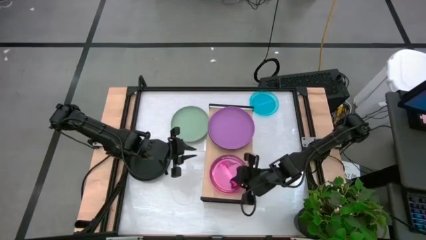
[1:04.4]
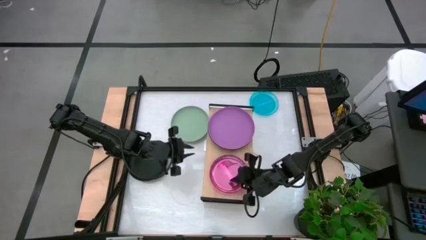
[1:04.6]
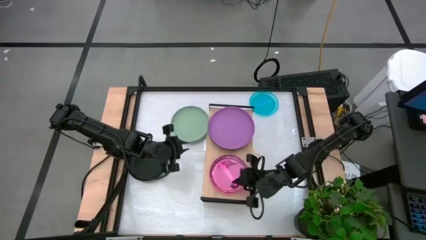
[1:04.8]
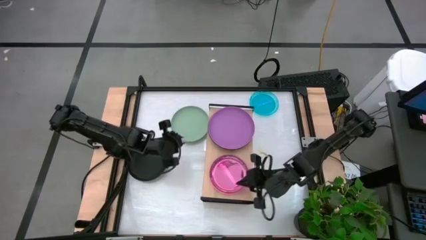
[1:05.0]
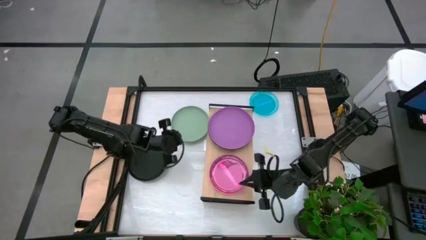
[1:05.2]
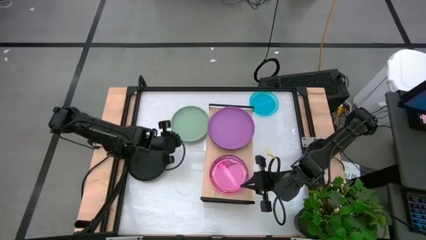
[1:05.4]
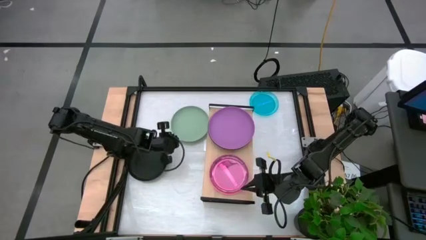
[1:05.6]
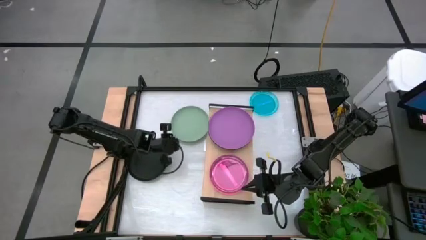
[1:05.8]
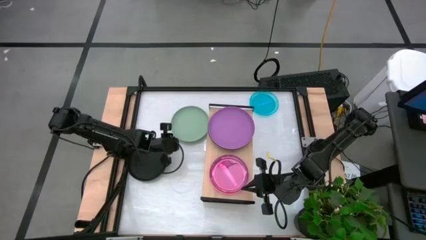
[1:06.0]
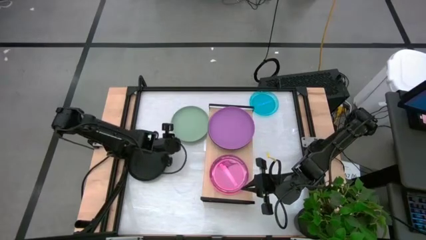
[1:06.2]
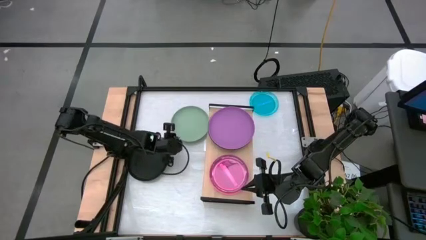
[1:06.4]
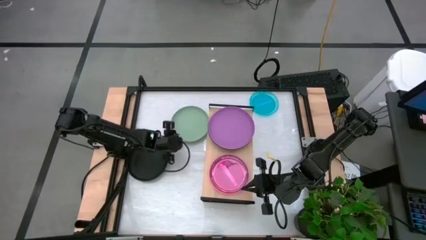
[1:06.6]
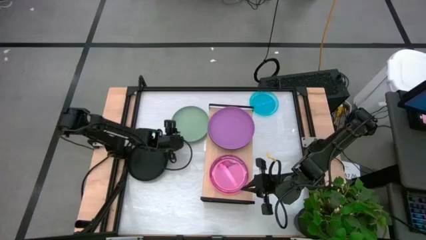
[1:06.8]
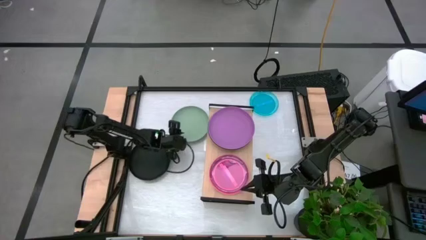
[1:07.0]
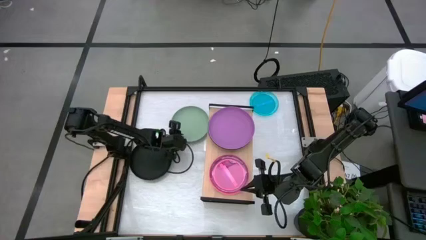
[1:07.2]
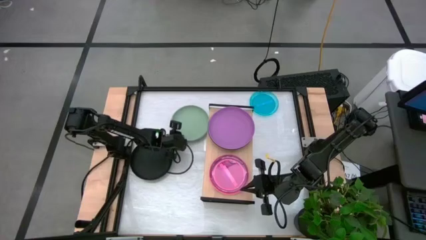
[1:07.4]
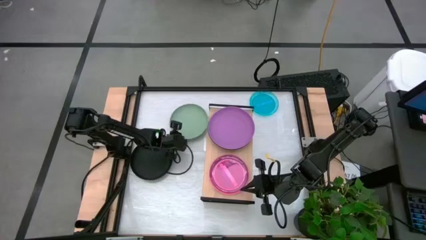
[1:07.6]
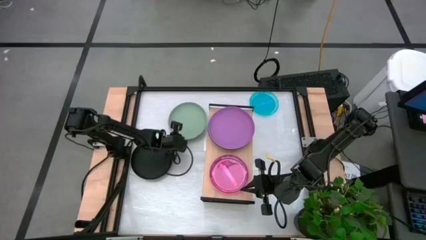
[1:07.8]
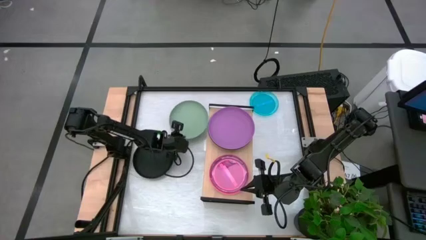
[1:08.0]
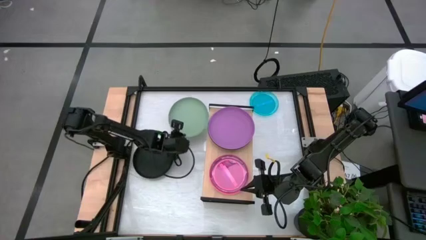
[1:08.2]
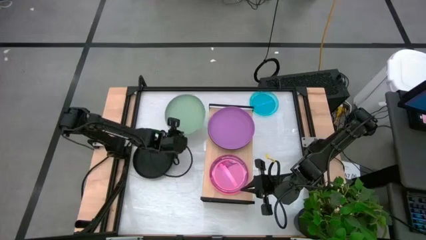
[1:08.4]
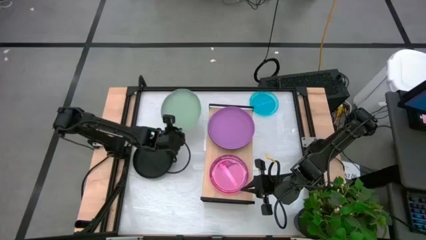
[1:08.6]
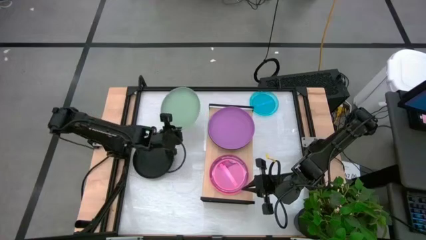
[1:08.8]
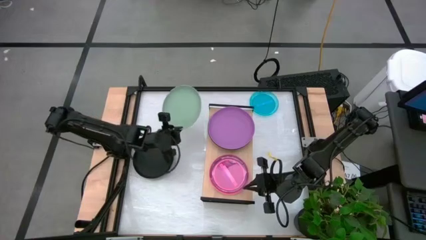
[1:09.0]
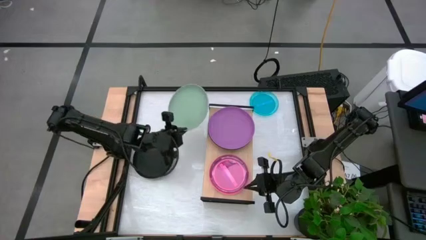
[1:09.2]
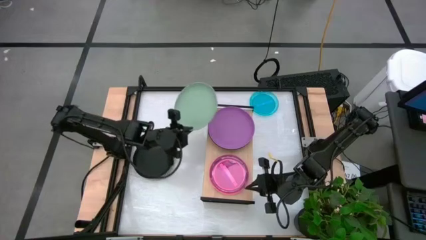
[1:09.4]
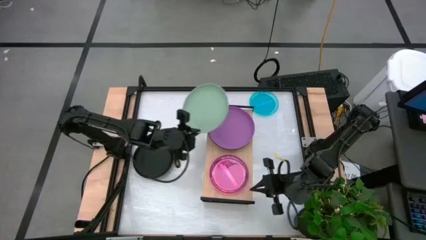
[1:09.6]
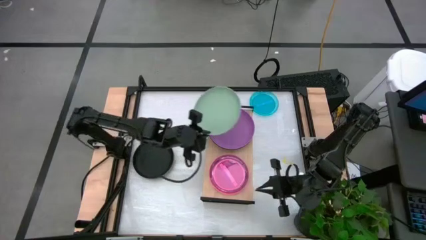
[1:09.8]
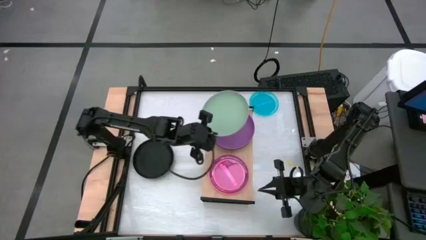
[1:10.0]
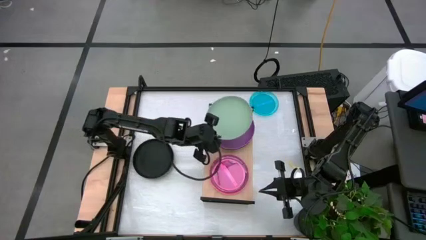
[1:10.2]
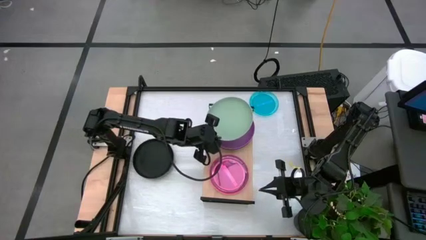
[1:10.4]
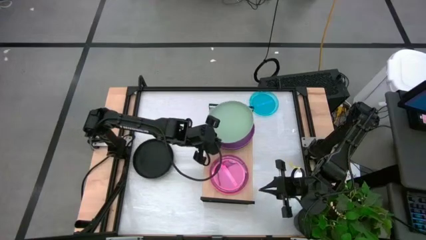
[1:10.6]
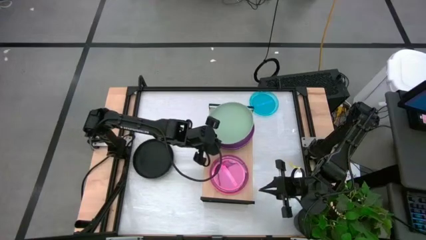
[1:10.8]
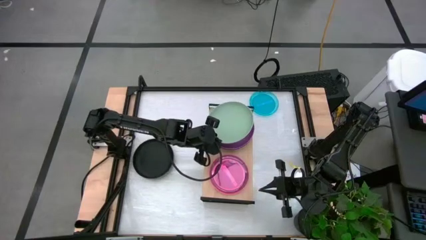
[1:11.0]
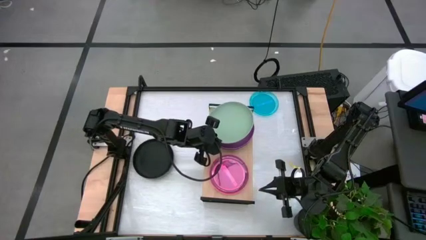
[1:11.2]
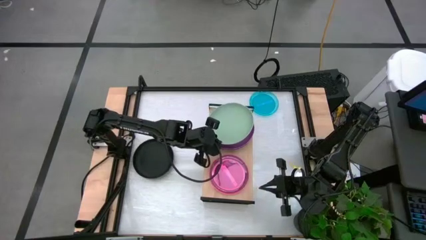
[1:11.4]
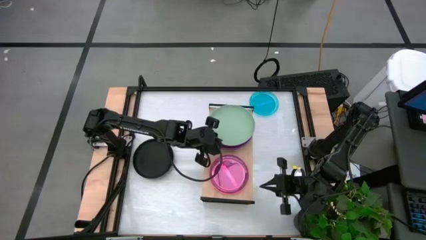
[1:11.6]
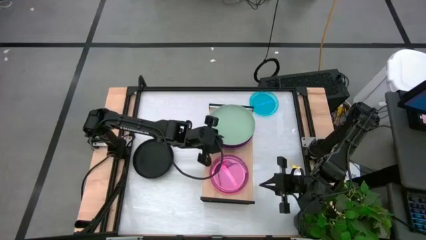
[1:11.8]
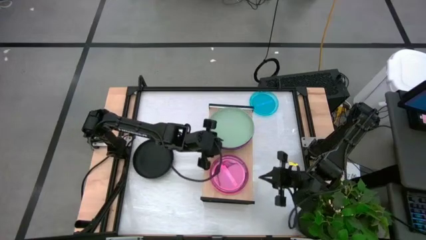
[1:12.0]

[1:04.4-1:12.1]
Task: Place and stack plates onto a shelf
Stack the light green plate on top of the purple plate on the shelf

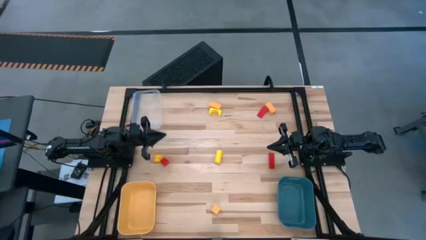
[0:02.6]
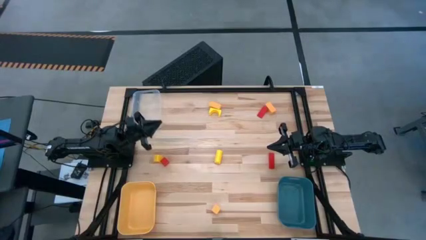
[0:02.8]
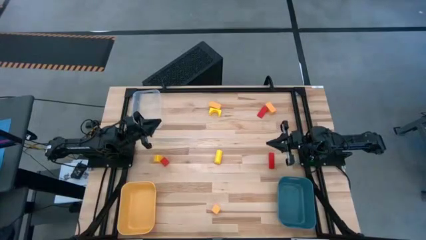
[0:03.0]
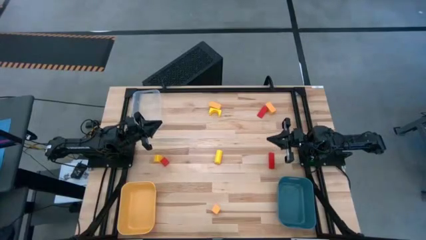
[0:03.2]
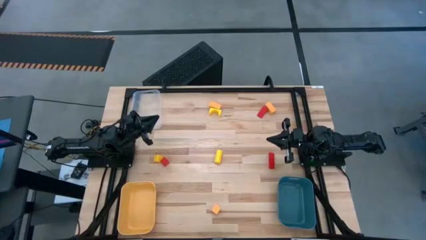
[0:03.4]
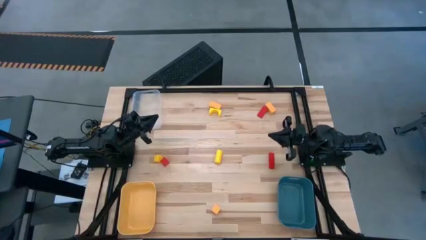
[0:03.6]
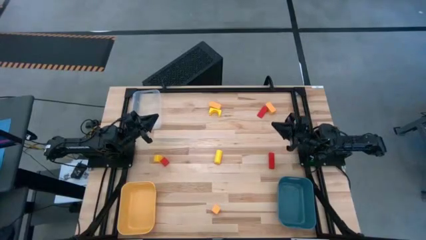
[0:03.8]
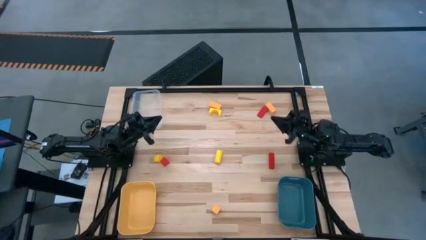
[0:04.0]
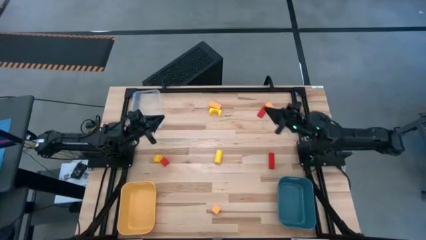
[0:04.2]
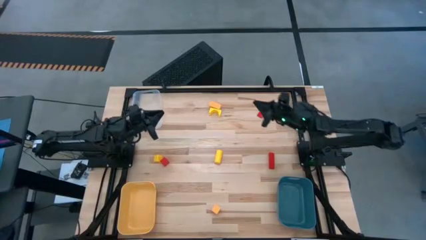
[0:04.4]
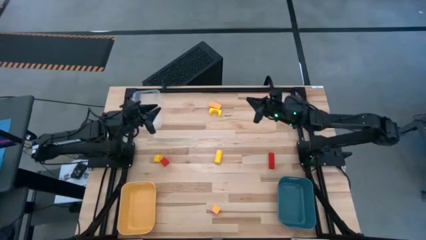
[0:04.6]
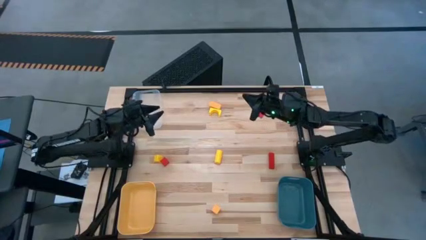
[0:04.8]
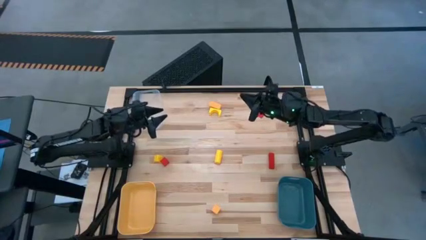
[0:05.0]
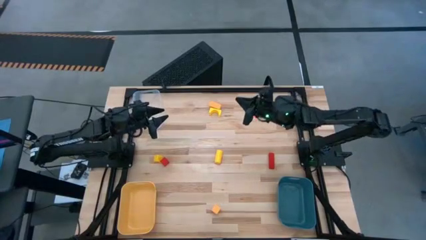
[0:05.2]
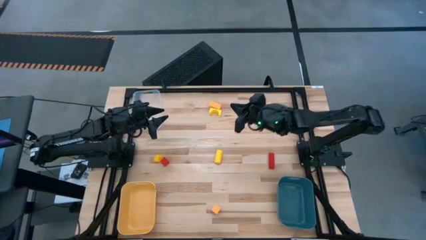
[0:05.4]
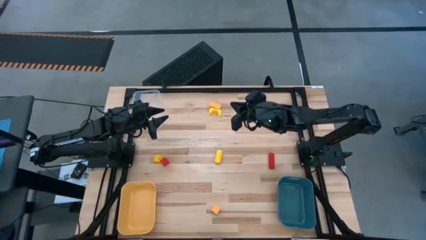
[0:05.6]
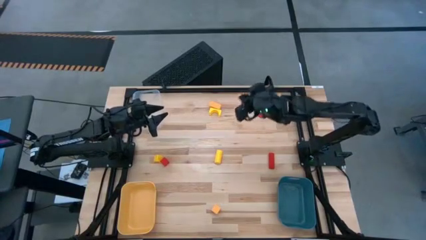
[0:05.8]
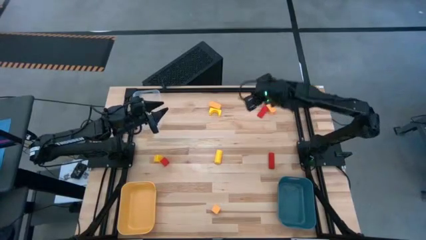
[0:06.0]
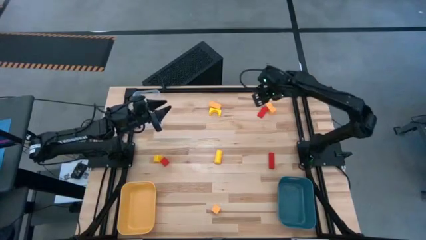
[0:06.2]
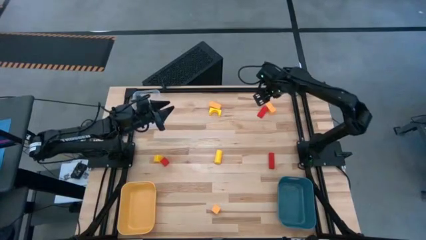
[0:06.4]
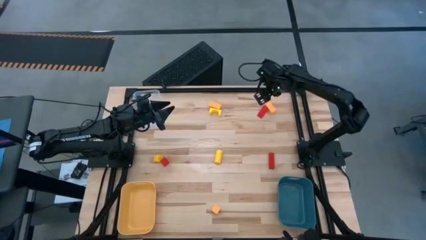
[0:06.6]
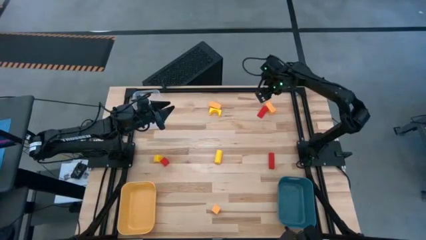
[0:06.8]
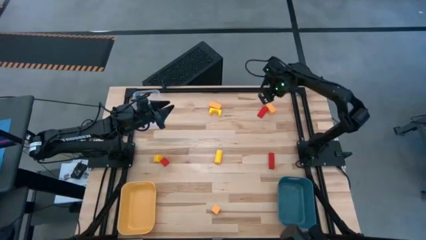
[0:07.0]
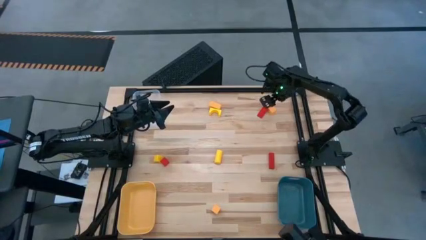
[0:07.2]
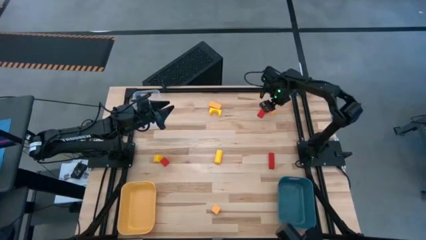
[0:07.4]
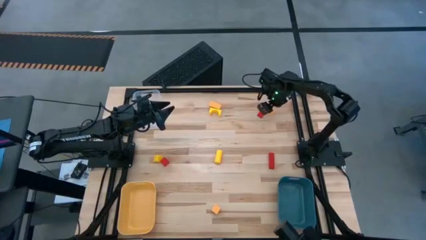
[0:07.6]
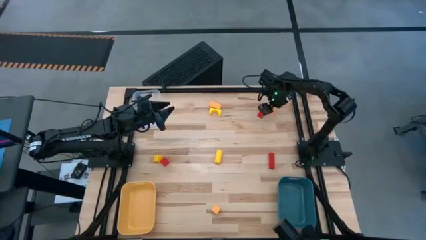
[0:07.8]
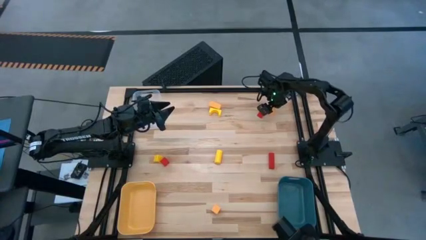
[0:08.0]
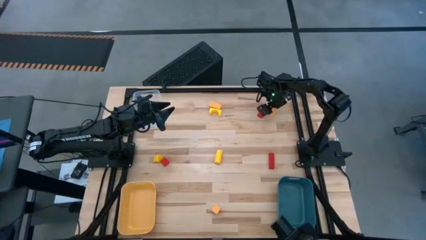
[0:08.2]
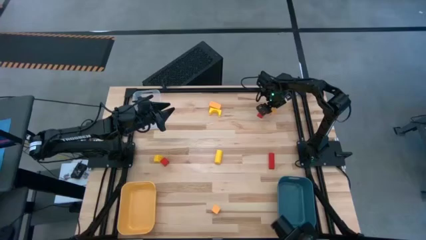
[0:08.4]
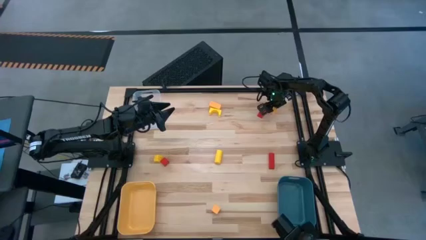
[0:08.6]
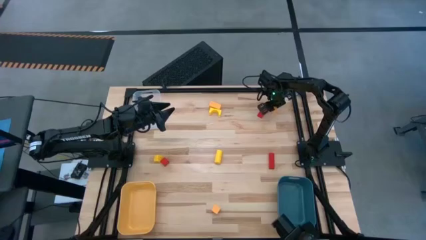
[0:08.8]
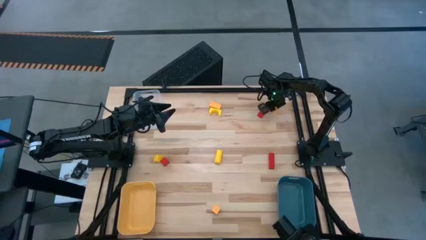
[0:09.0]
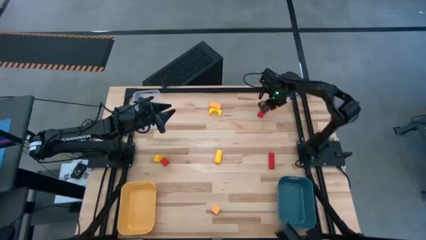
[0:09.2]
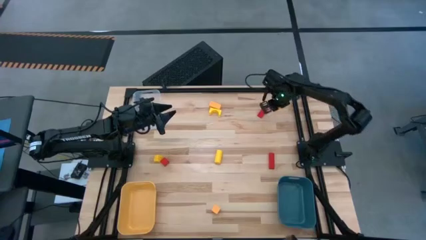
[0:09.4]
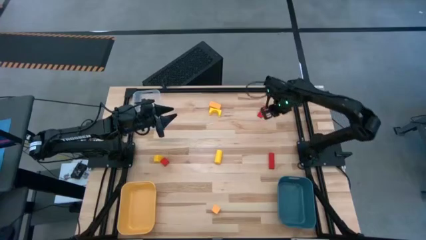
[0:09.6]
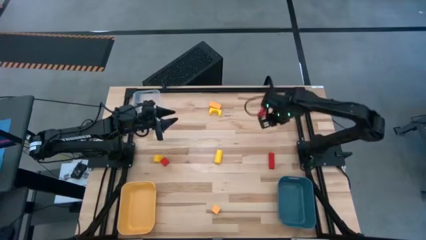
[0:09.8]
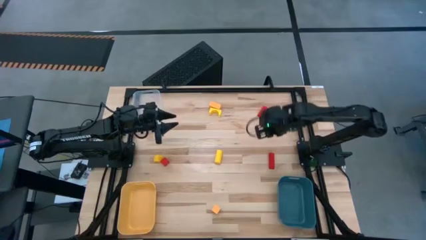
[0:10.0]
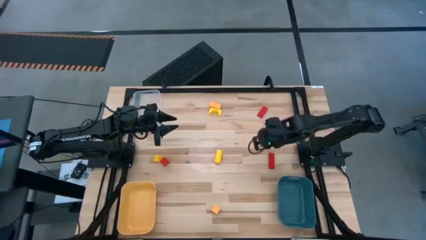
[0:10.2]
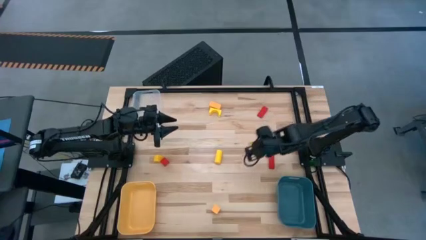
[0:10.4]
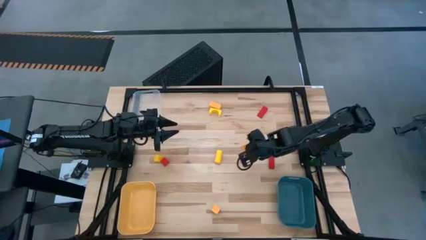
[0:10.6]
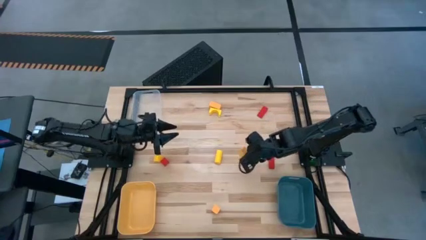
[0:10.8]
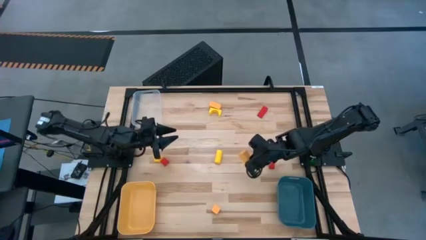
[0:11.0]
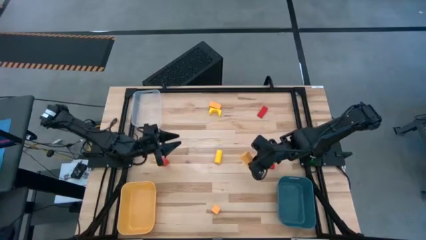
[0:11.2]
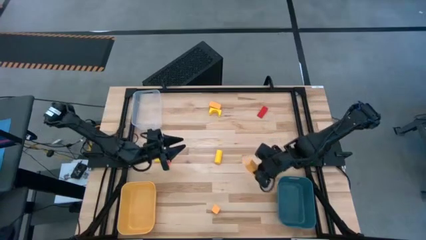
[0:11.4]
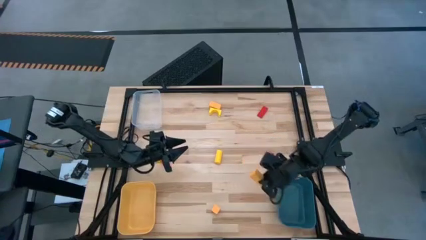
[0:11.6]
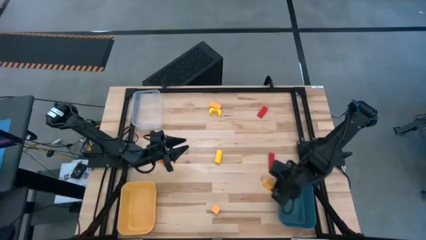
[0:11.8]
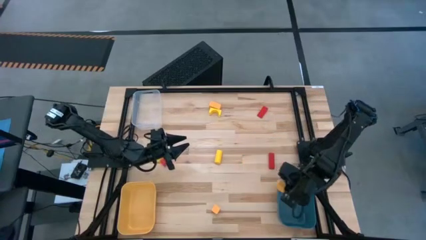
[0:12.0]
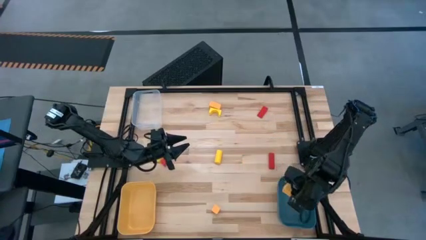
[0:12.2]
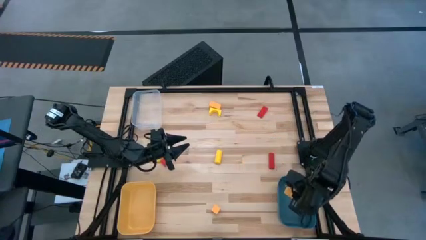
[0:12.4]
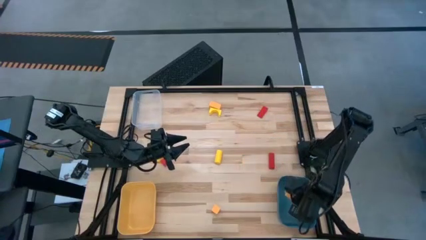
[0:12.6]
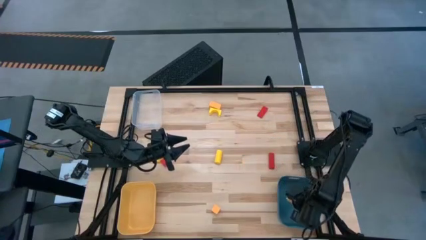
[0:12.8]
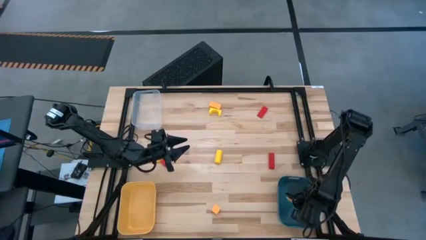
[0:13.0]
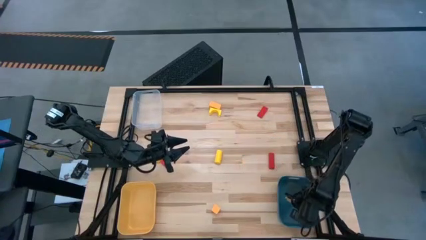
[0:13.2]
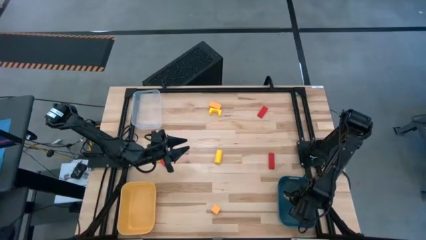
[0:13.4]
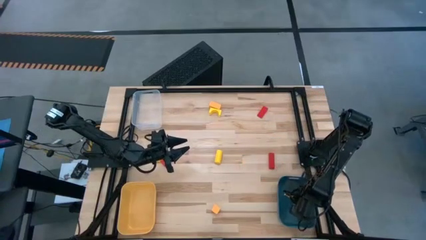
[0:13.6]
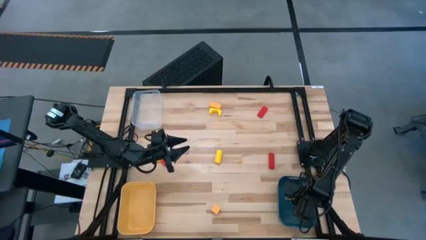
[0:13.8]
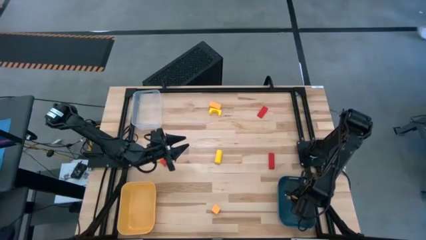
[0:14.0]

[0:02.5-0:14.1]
Task: Sort & place blocks by color
Put the top right orange block in the dark green bin
